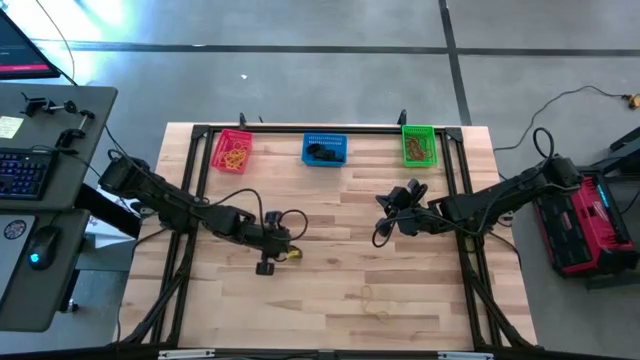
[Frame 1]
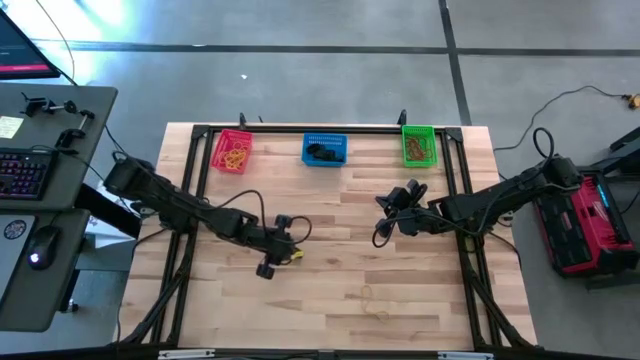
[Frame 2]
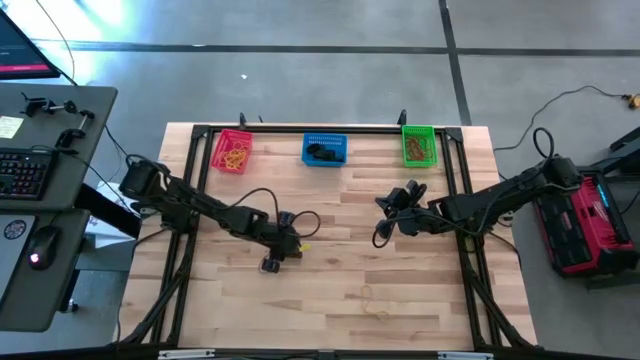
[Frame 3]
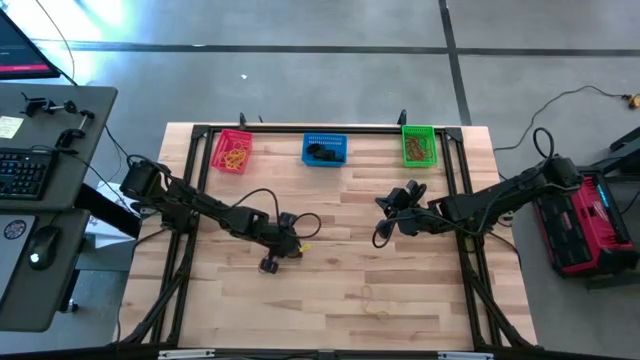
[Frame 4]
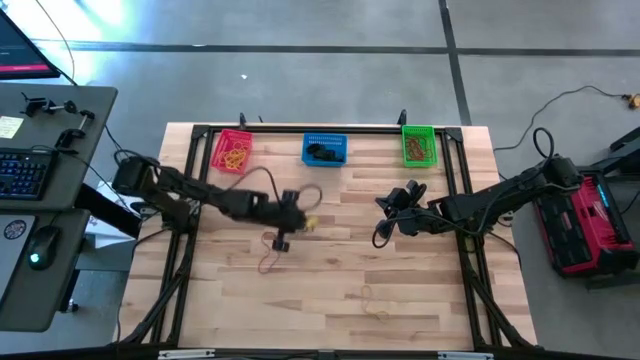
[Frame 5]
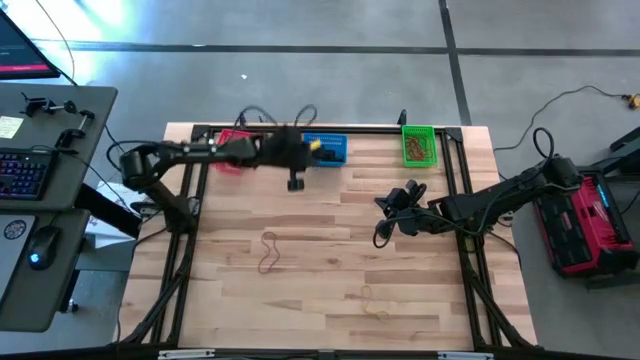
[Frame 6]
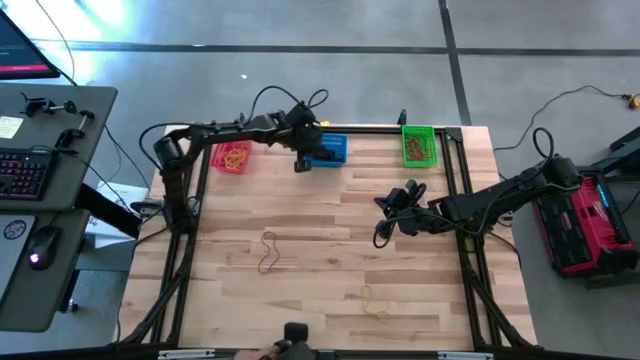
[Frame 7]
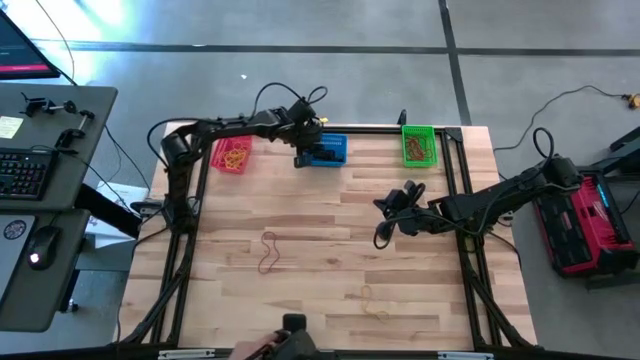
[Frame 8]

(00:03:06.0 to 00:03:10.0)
Task: Sort rubber bands into baskets
Put the black rubber band into the blue bin

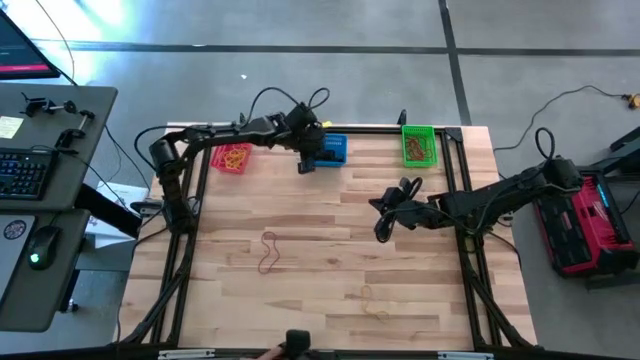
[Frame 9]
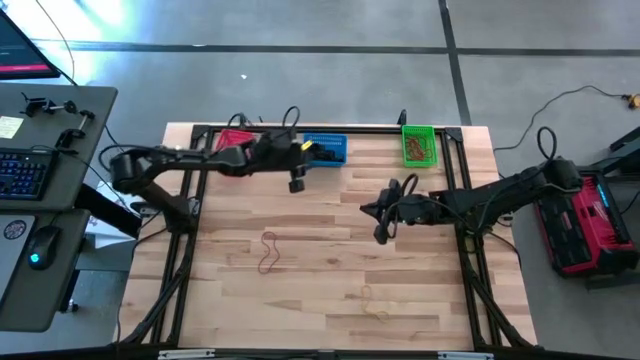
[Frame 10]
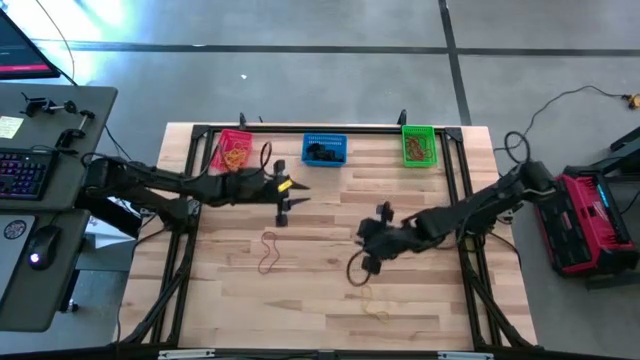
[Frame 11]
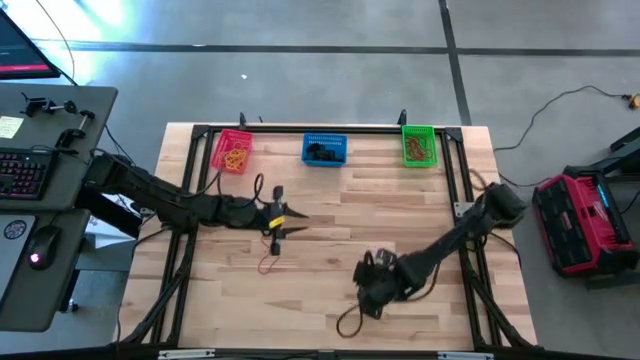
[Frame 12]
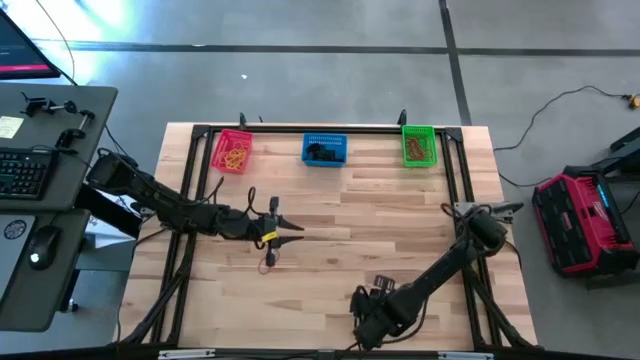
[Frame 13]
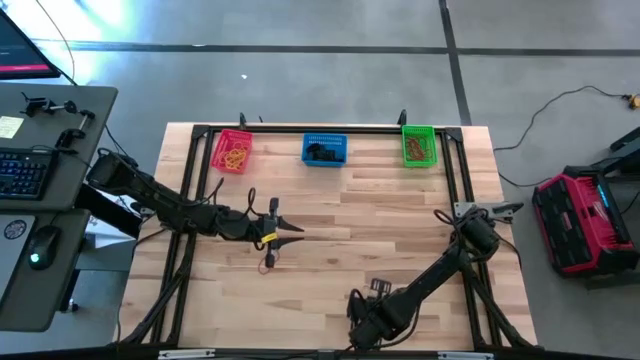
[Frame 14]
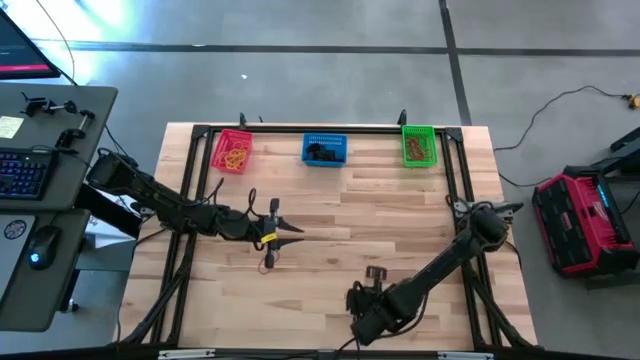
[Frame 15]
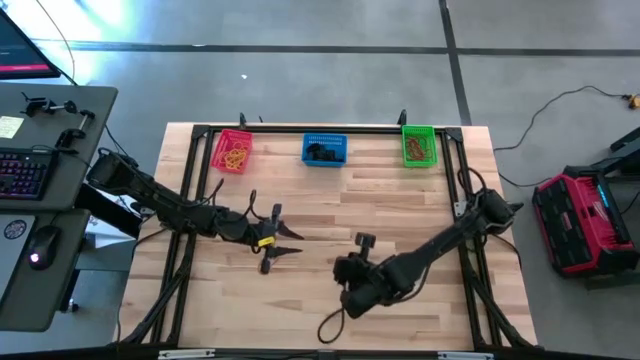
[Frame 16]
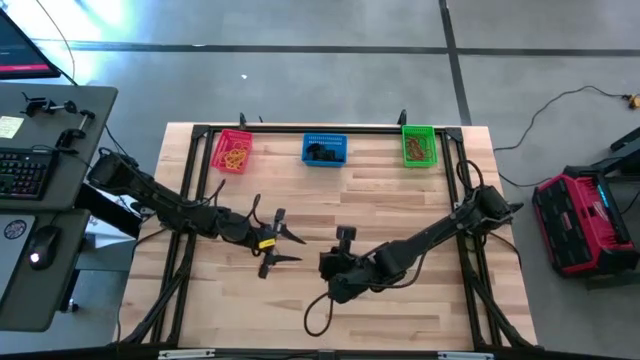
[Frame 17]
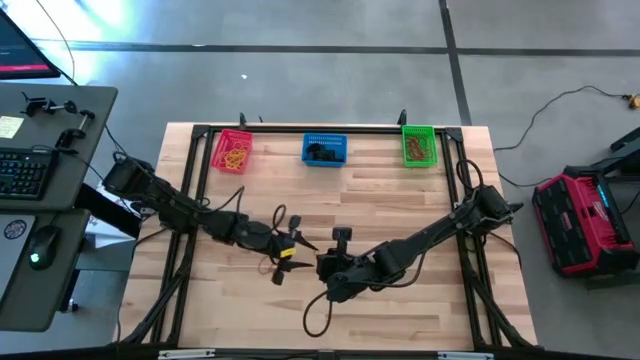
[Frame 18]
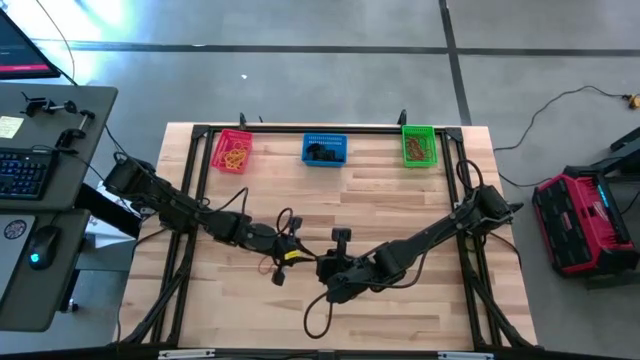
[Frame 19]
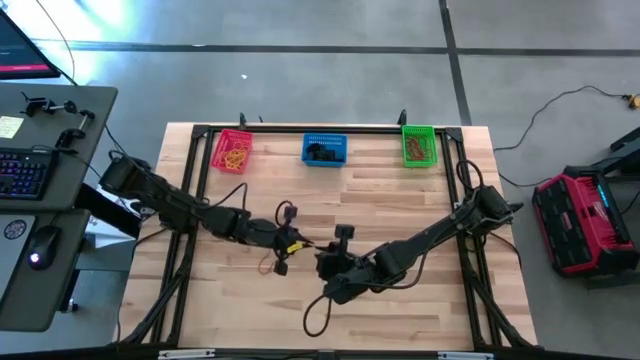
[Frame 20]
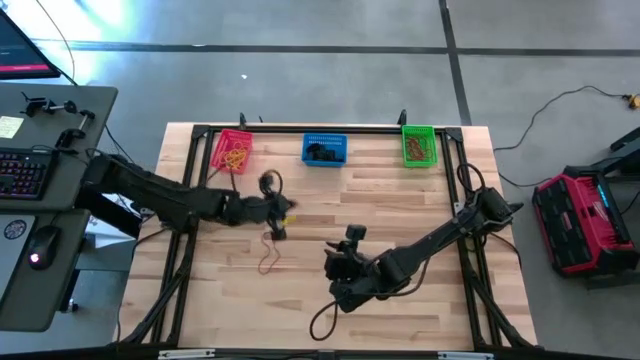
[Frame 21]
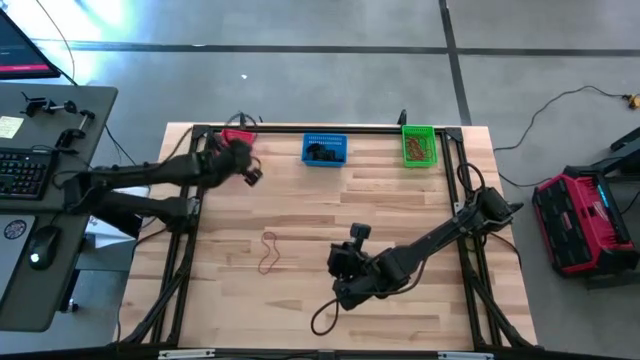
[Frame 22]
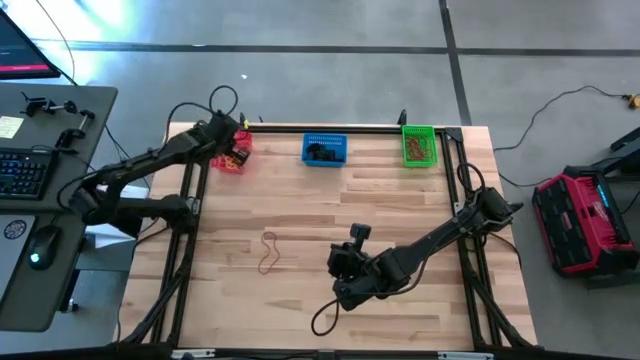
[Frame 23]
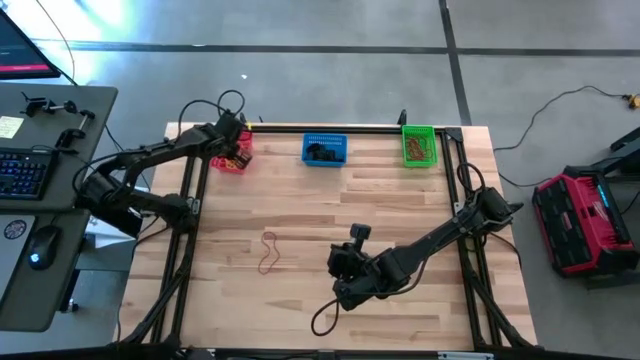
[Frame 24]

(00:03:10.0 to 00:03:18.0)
Put the yellow rubber band into the red bin

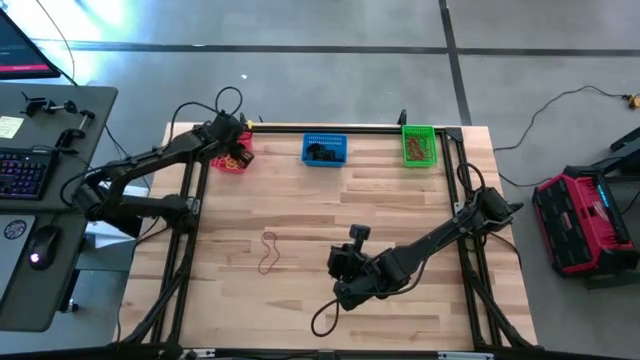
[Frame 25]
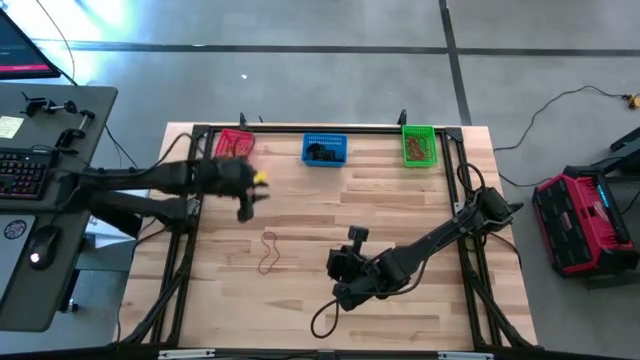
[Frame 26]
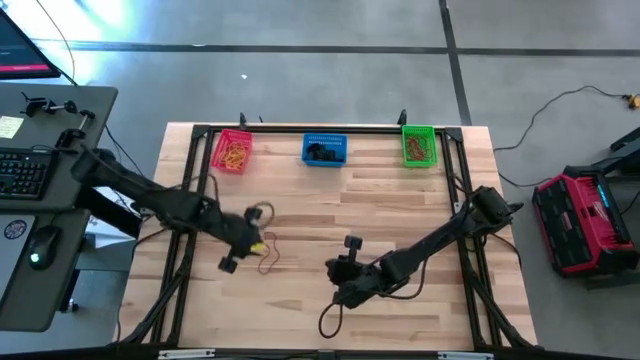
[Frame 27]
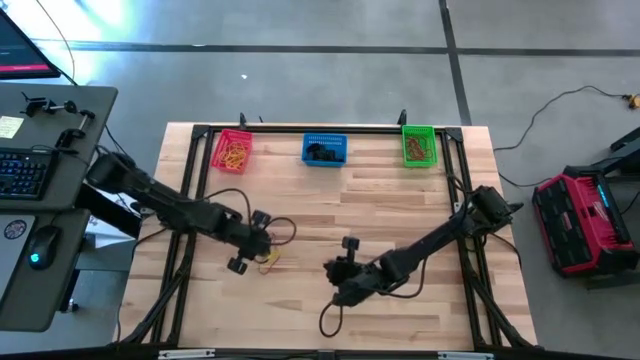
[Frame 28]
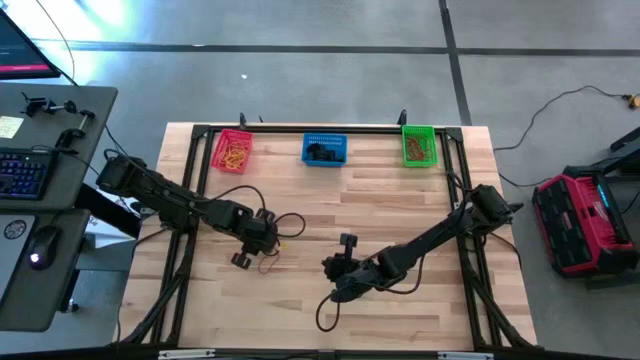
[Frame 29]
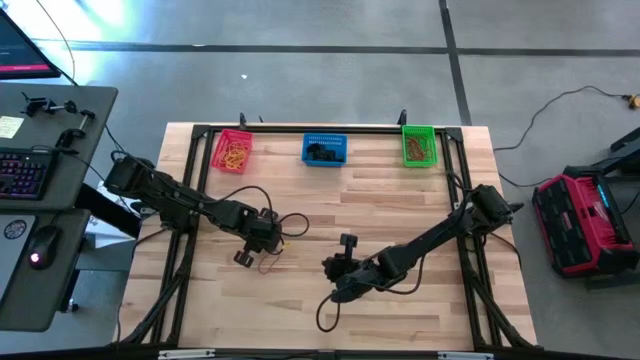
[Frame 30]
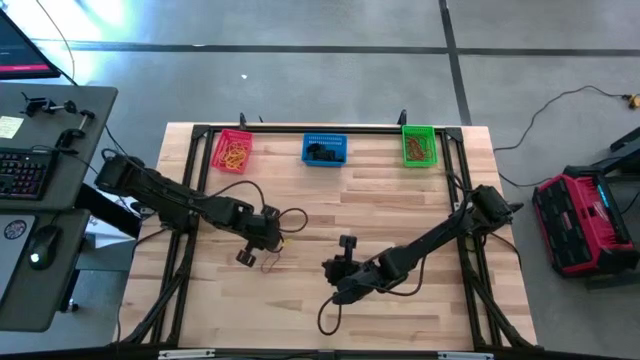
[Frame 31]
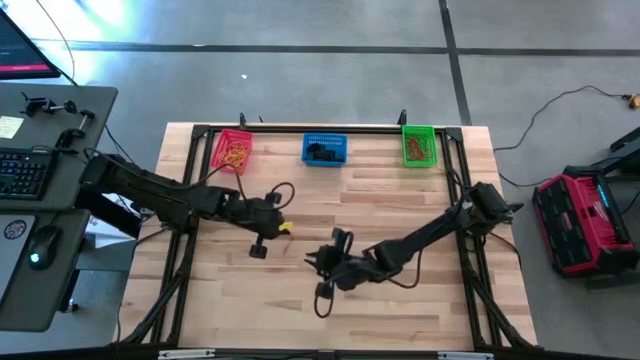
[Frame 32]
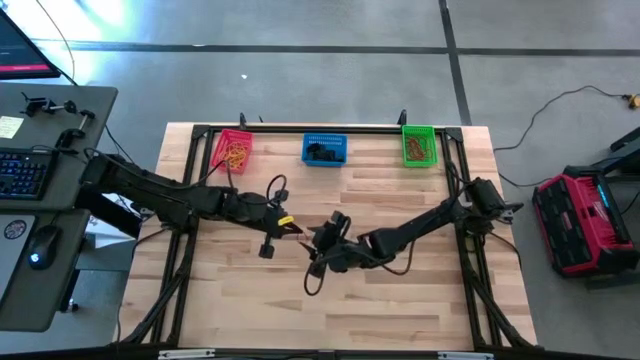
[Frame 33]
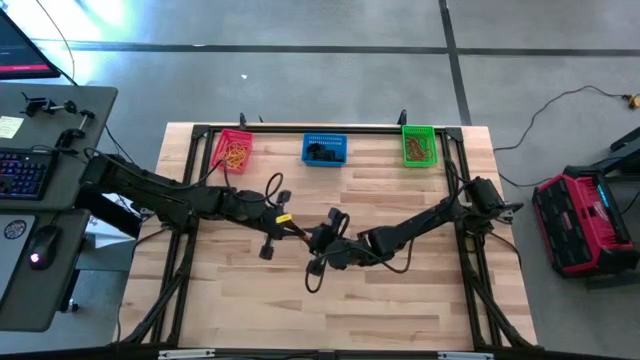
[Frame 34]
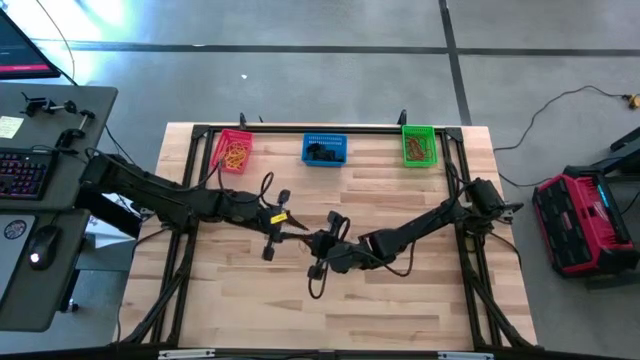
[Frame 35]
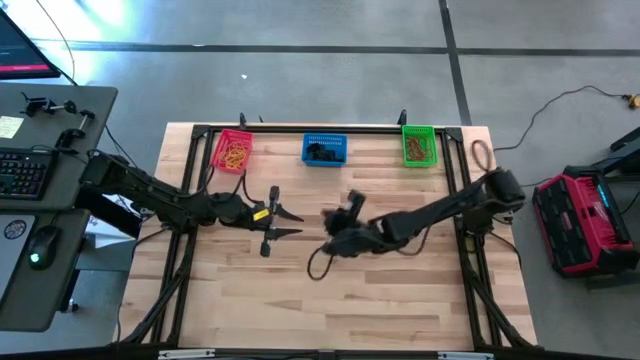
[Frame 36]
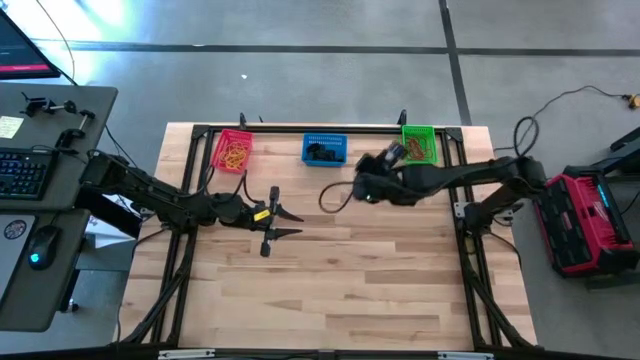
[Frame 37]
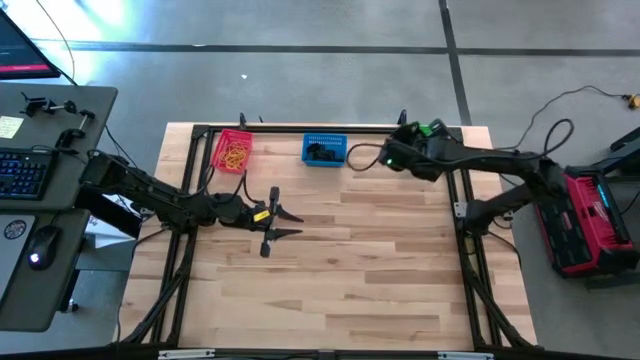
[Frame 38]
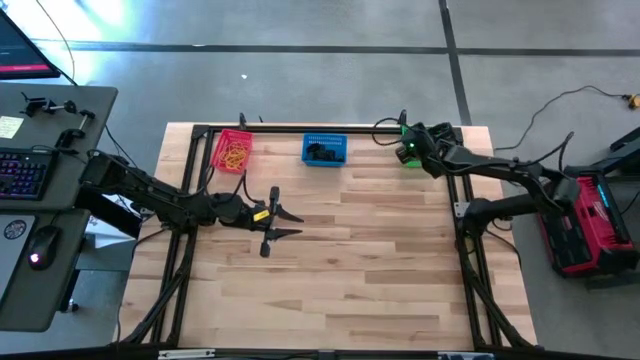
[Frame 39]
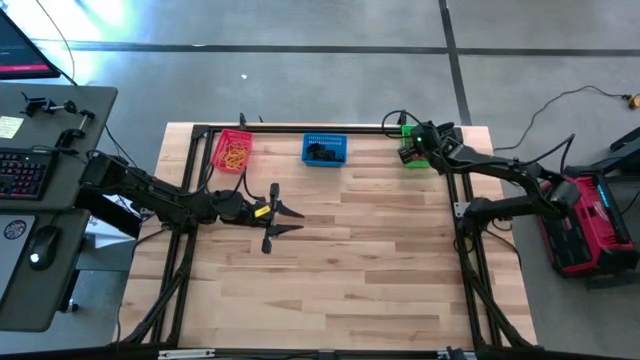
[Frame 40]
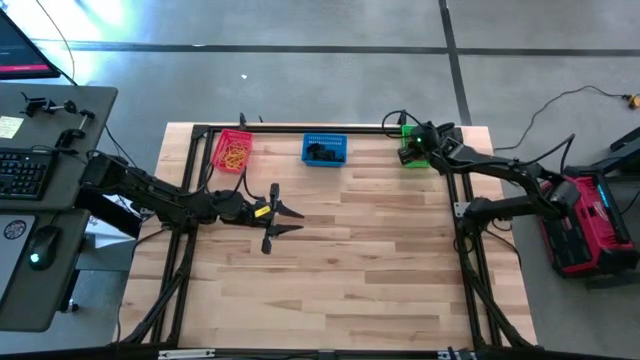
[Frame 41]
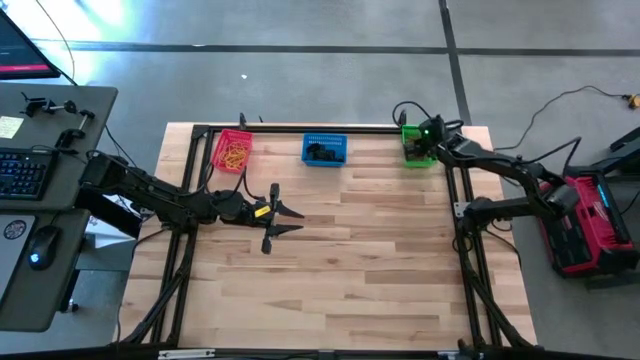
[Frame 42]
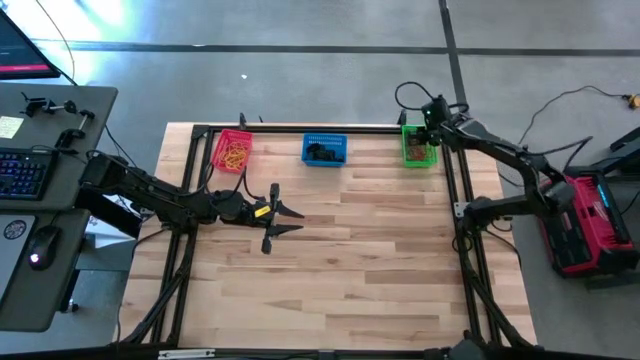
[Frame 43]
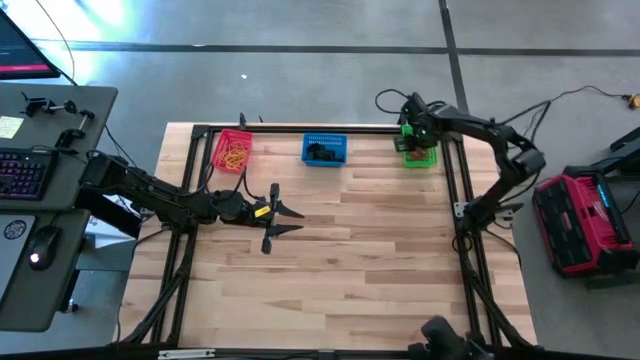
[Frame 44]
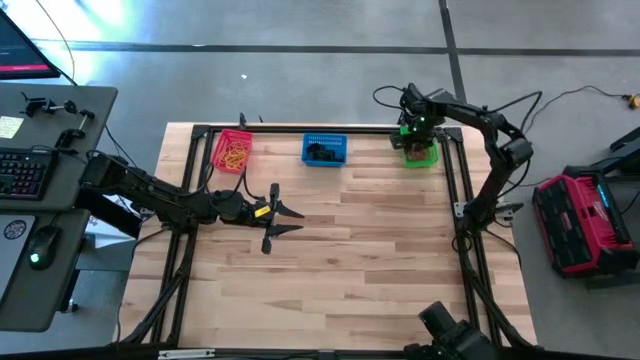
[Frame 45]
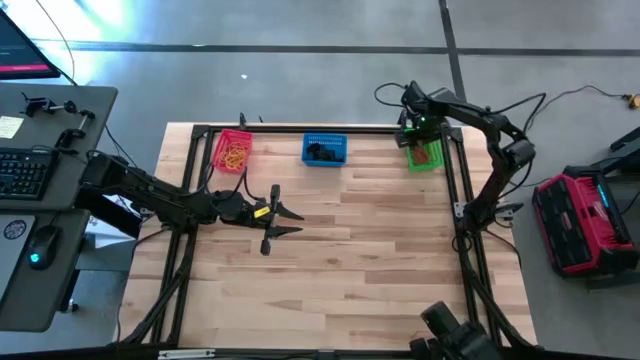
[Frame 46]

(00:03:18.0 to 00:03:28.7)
Put the red rubber band into the green bin
